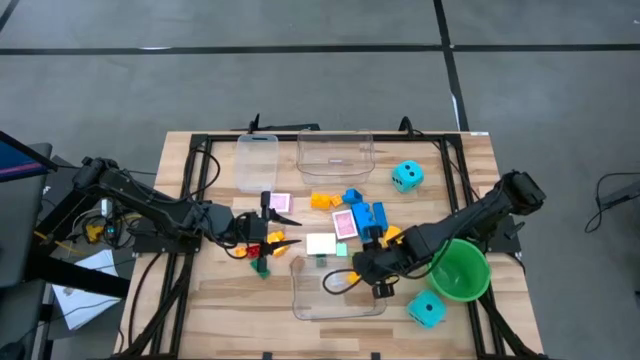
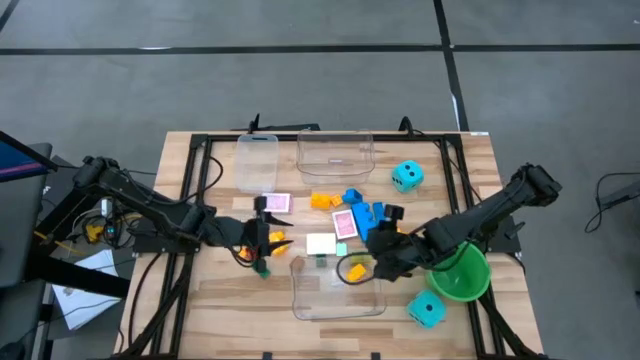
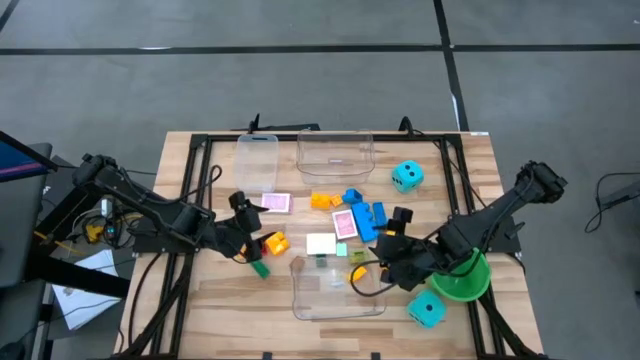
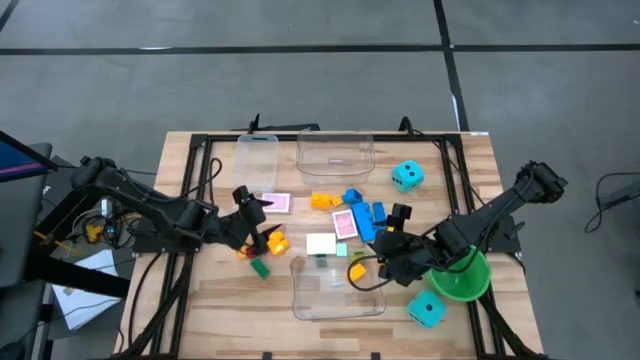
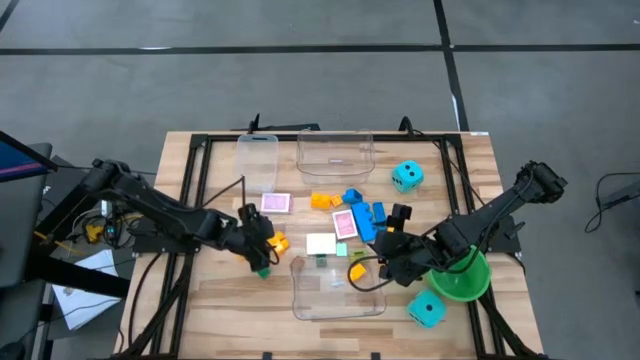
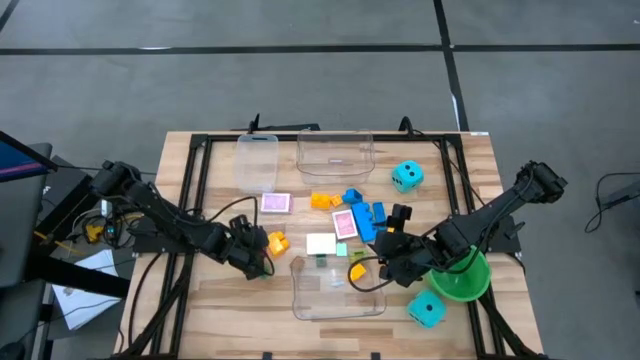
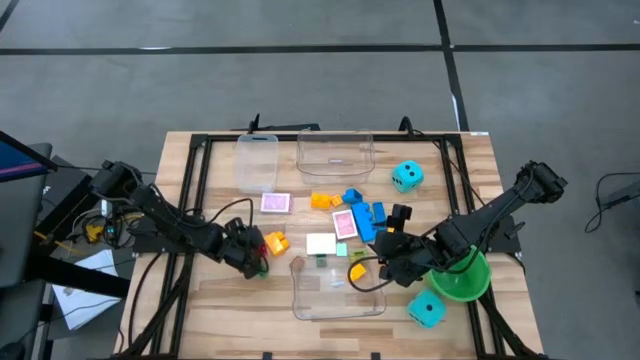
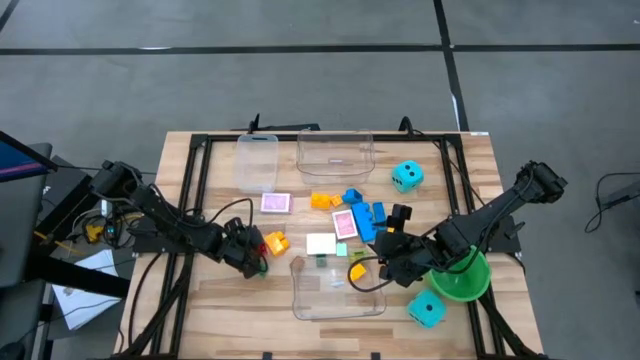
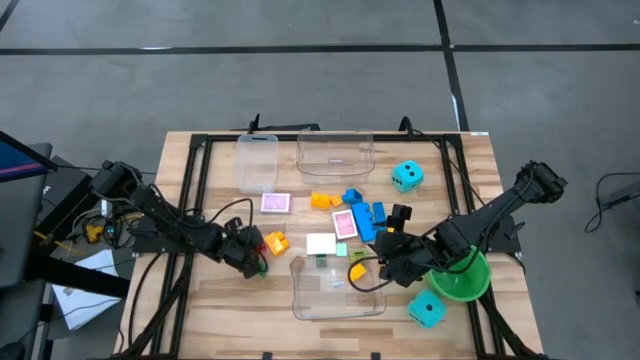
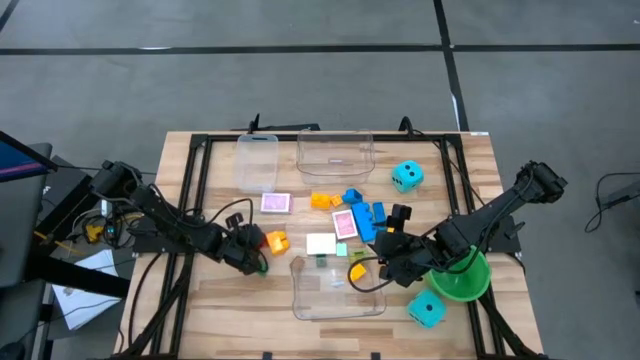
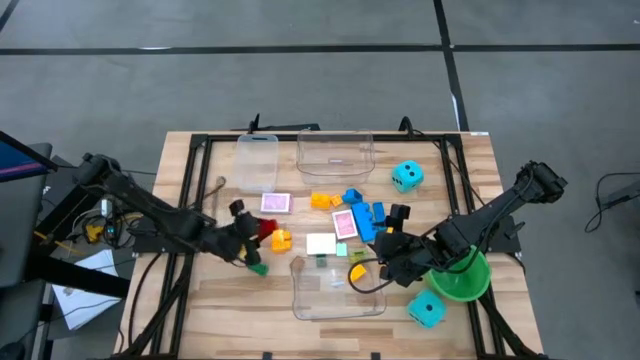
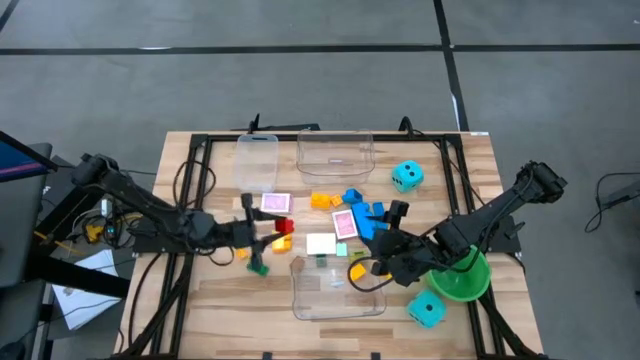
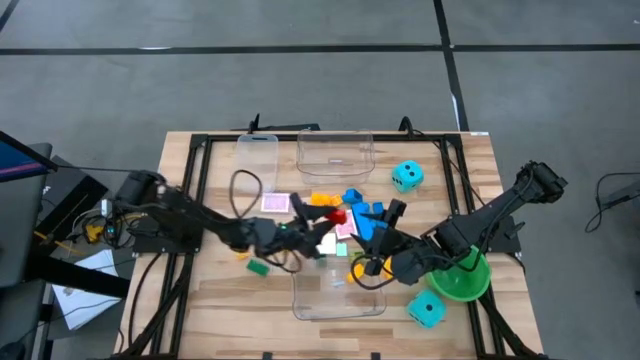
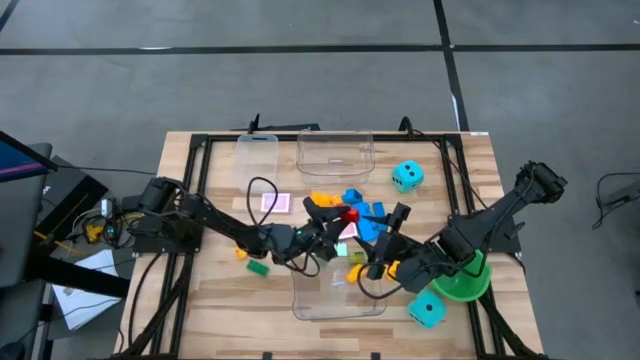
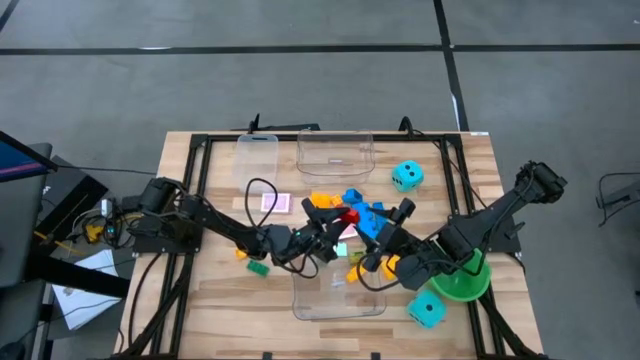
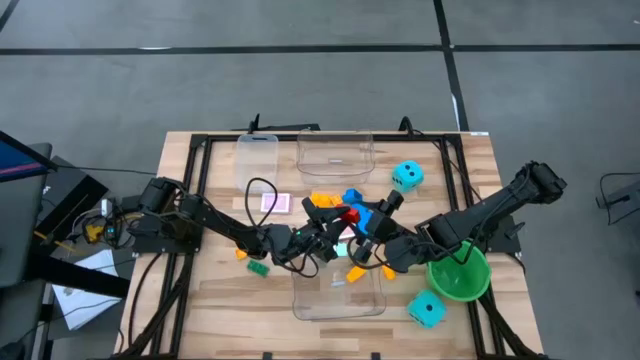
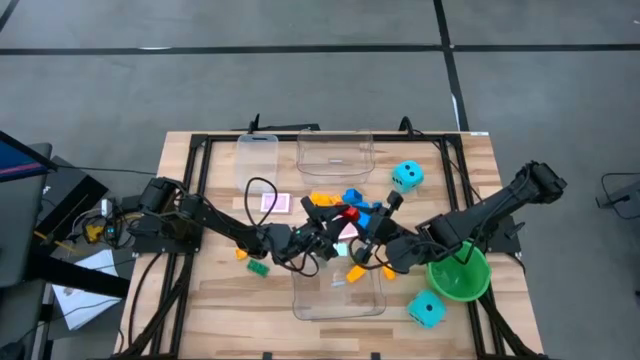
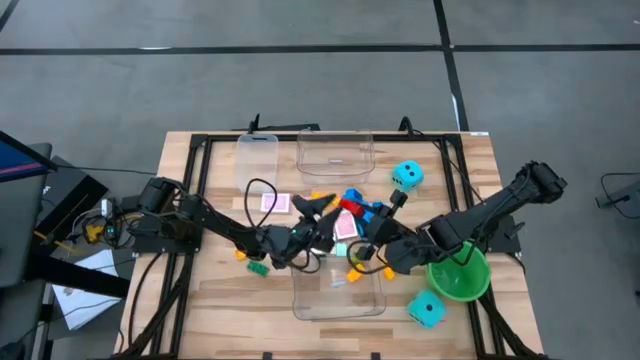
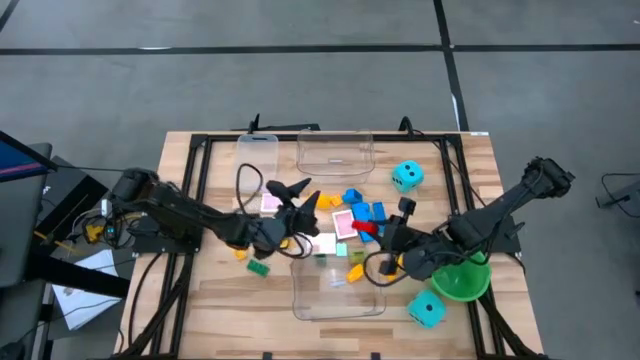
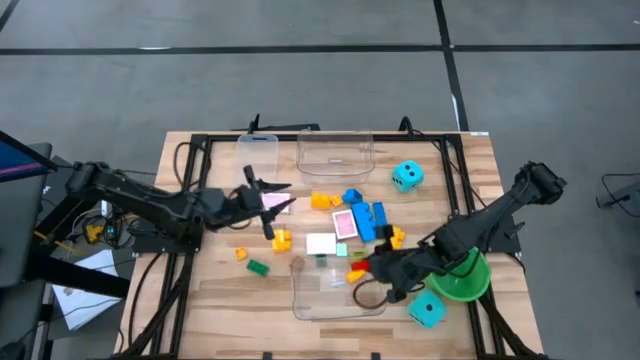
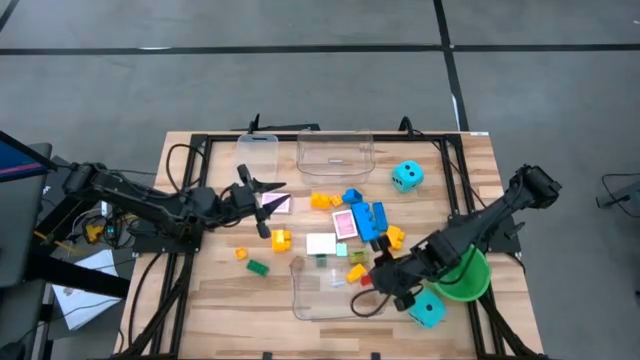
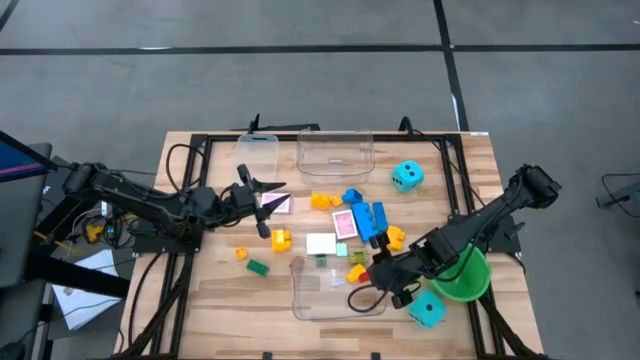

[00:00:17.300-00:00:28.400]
Task: Pick & Place Toys
Put the red game piece into the bottom transparent bin

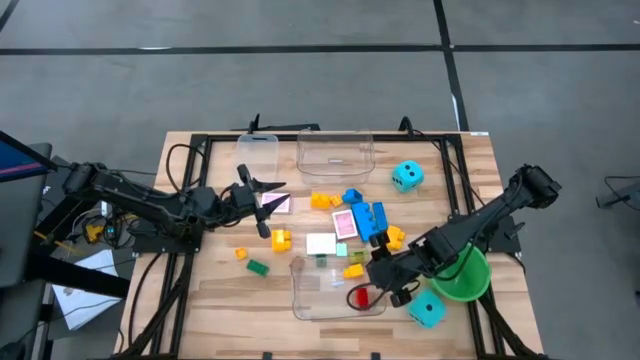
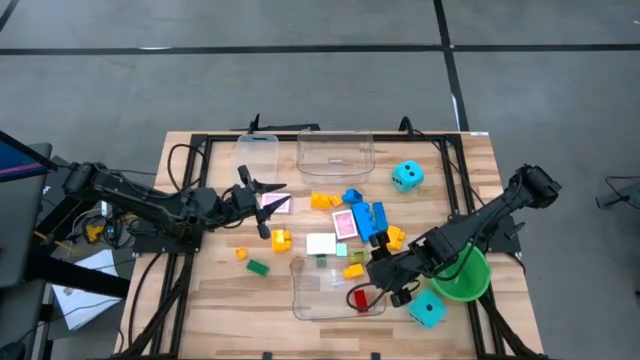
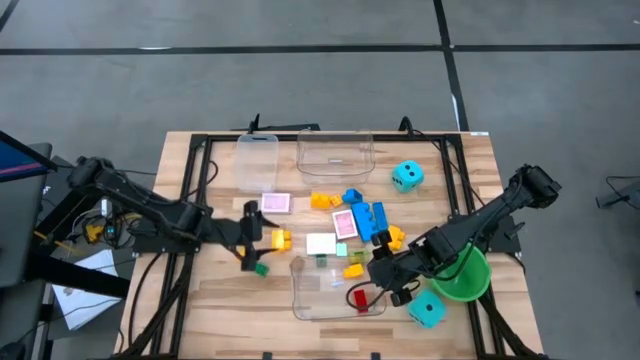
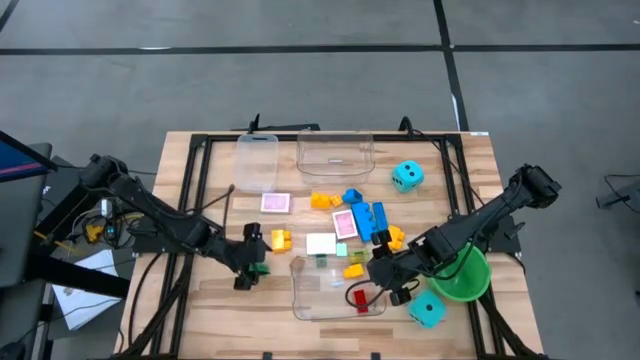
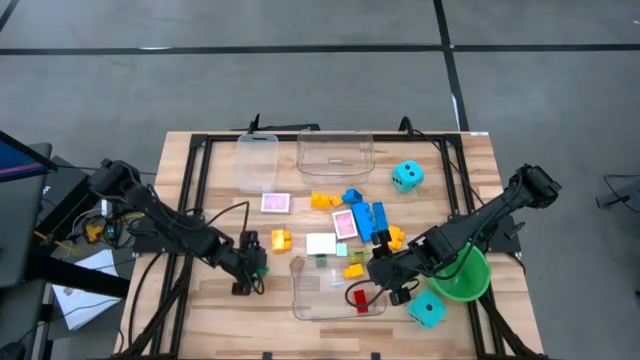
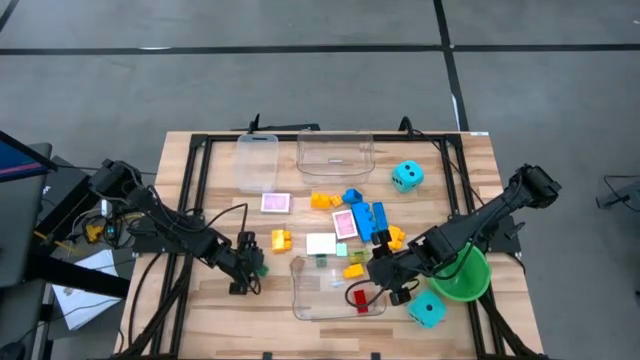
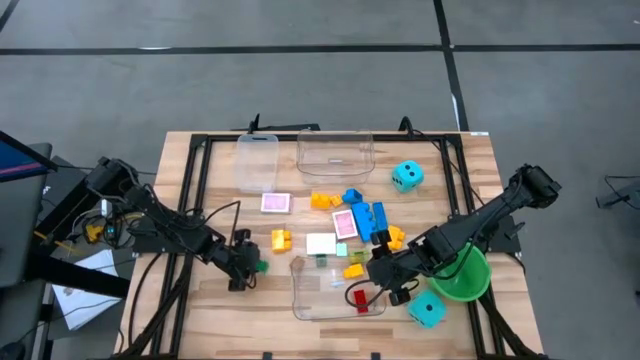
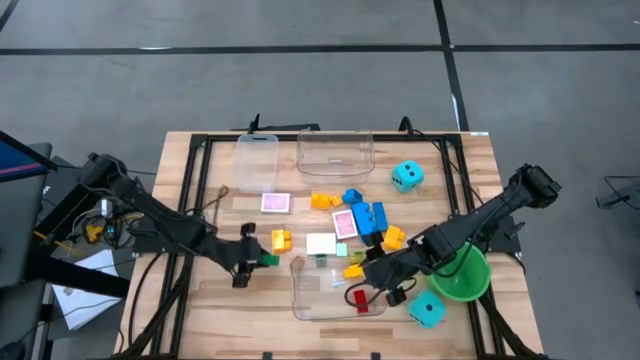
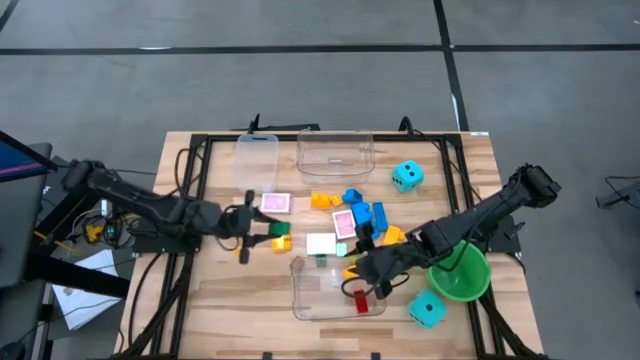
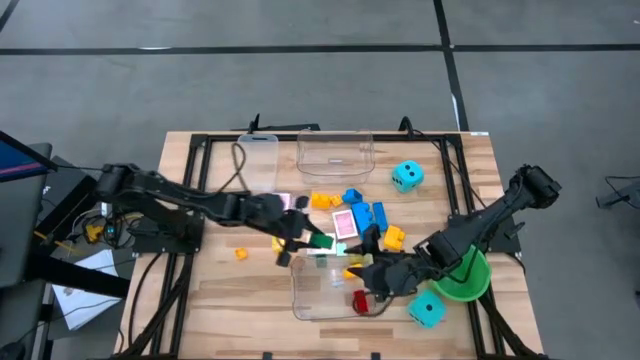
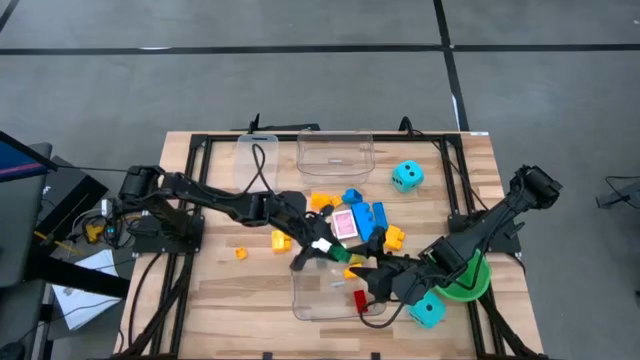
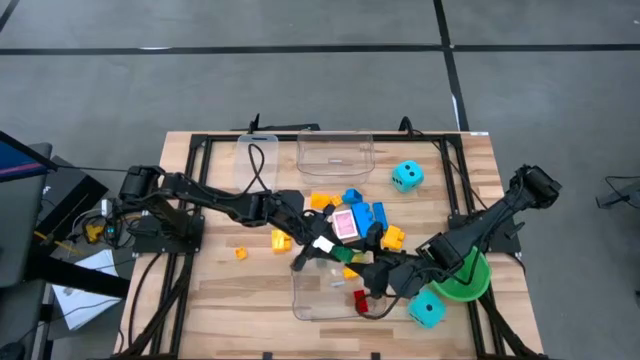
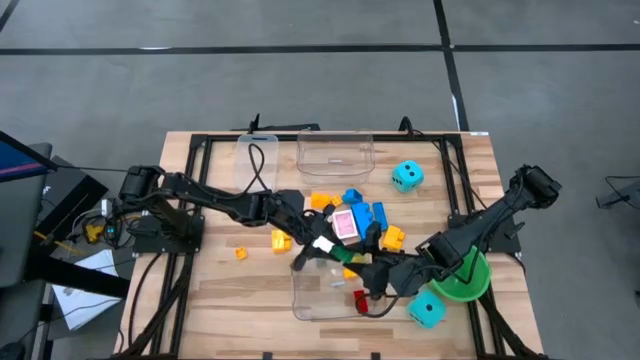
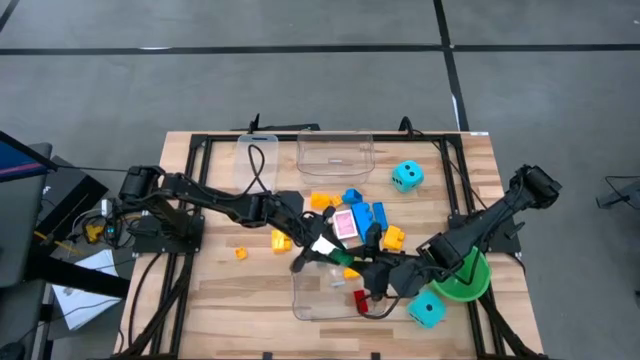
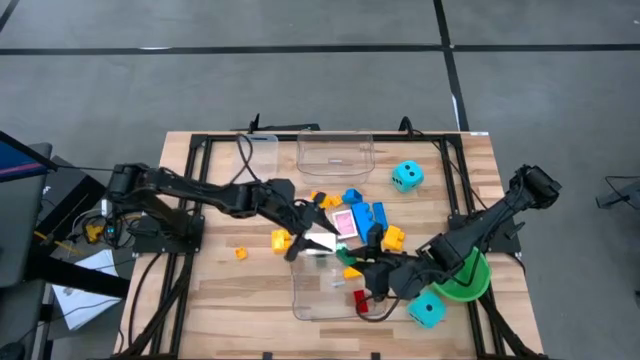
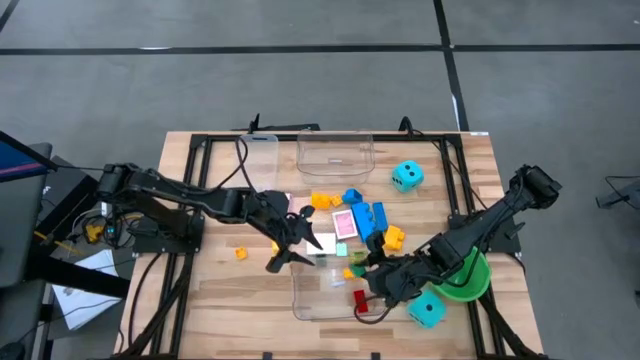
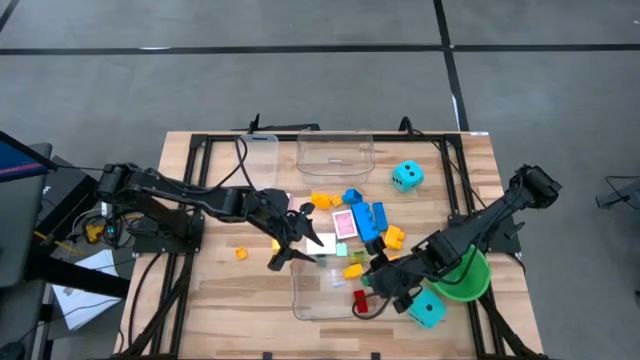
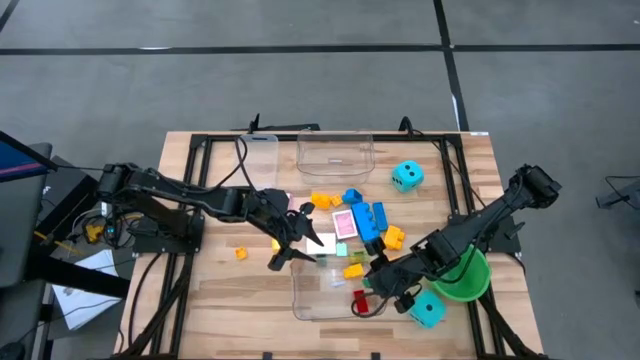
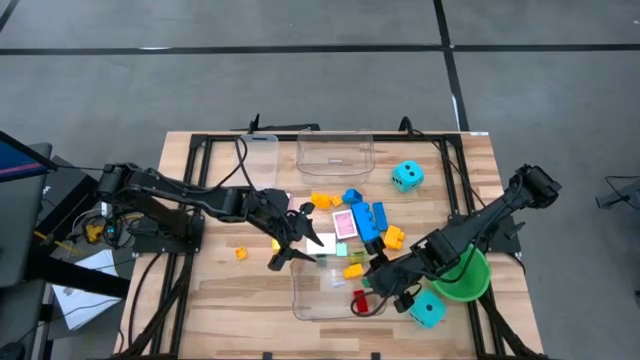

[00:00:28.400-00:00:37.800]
Put the green game piece into the bottom transparent bin

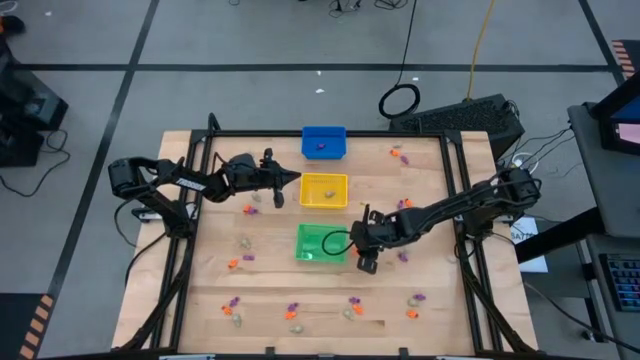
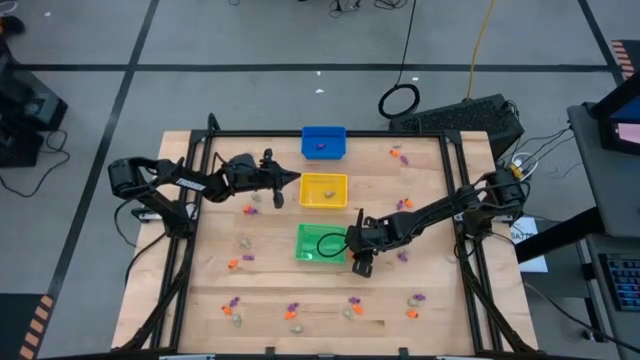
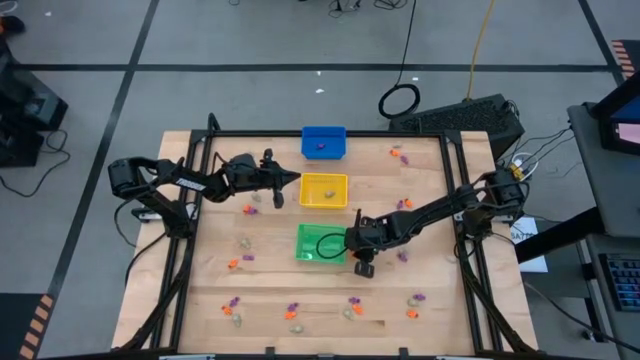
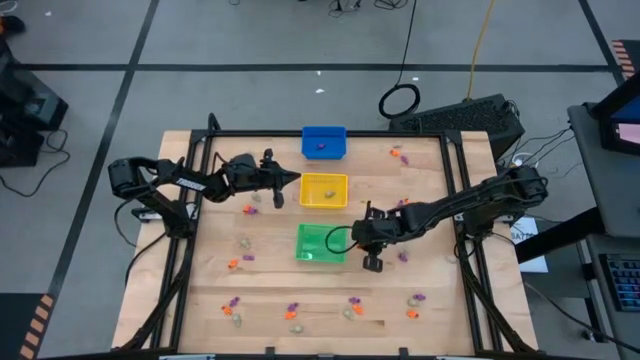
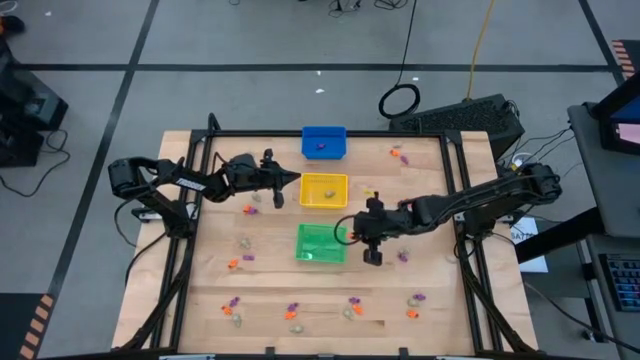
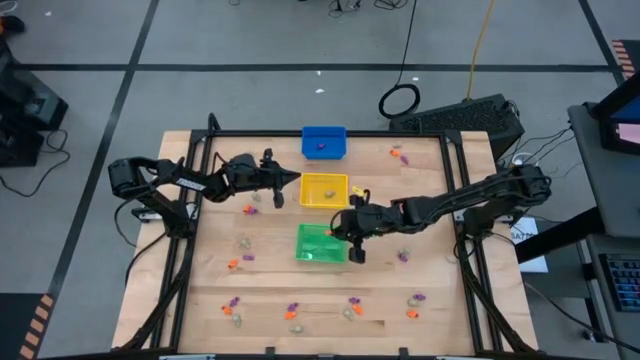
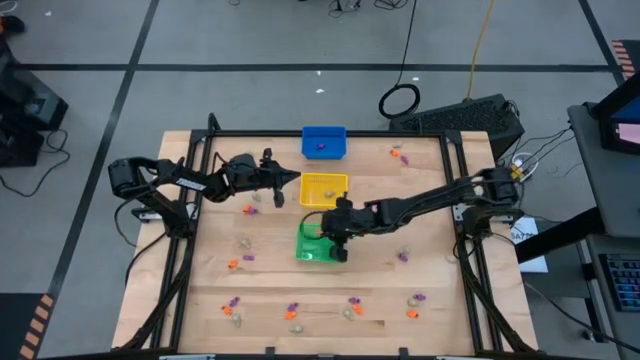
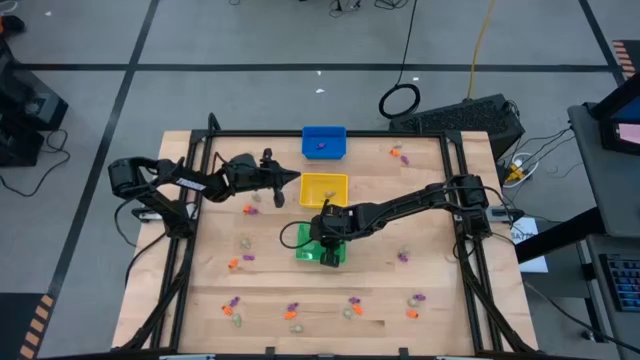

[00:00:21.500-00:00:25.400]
Task: Sort Halloween decoration
Put the orange skeleton toy into the green bin
